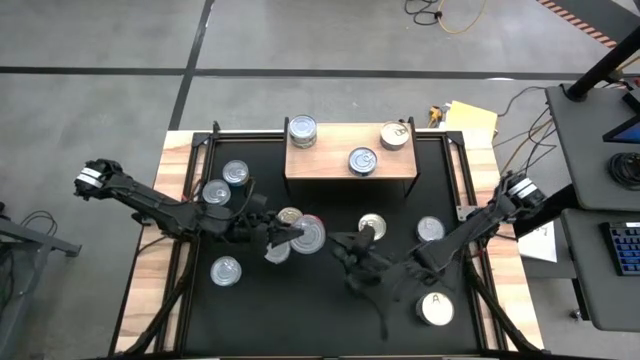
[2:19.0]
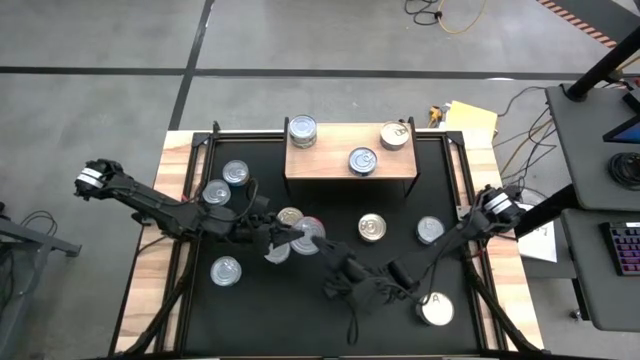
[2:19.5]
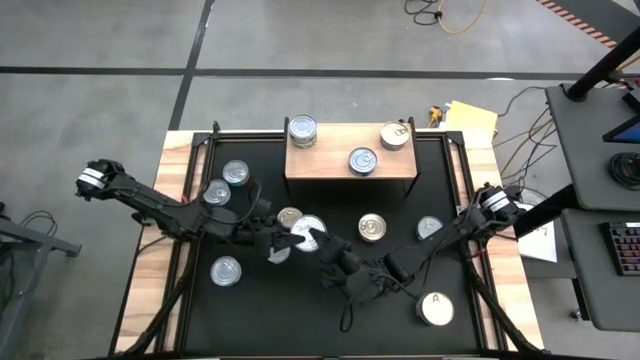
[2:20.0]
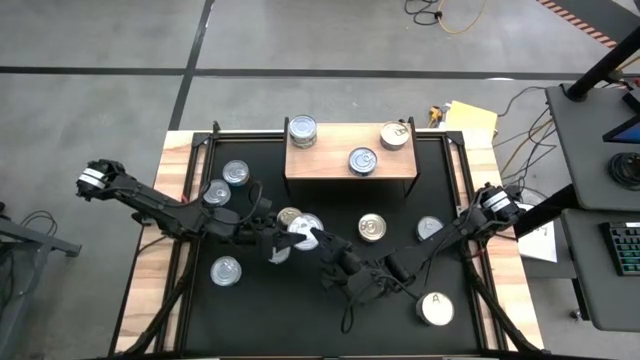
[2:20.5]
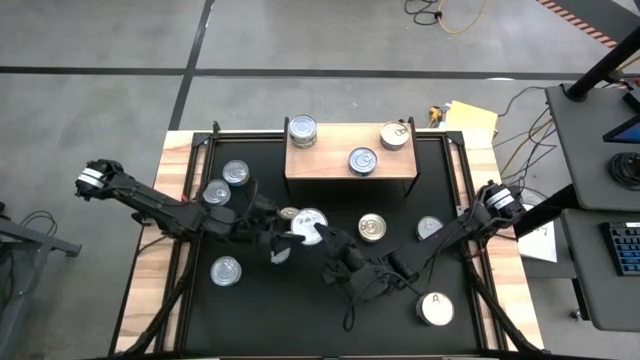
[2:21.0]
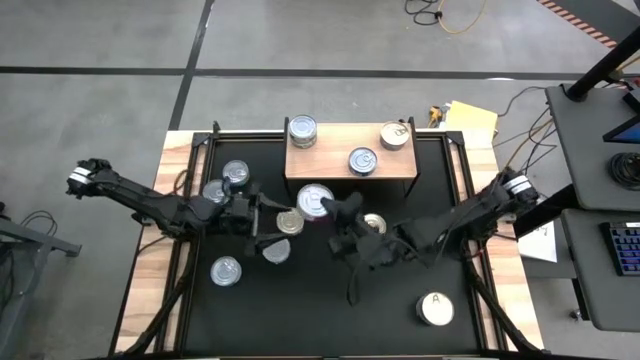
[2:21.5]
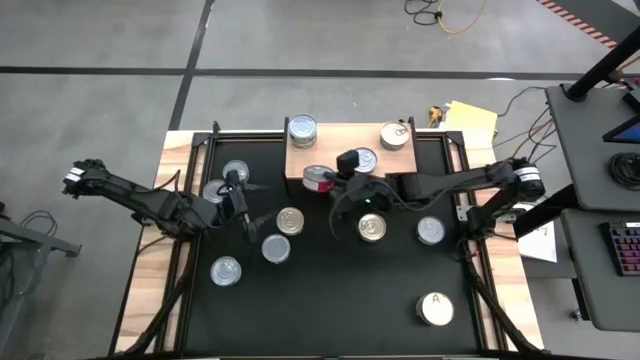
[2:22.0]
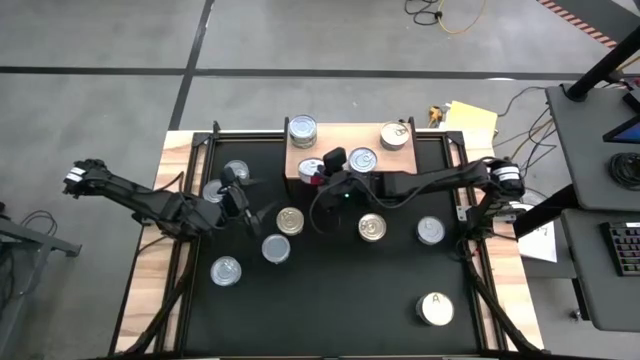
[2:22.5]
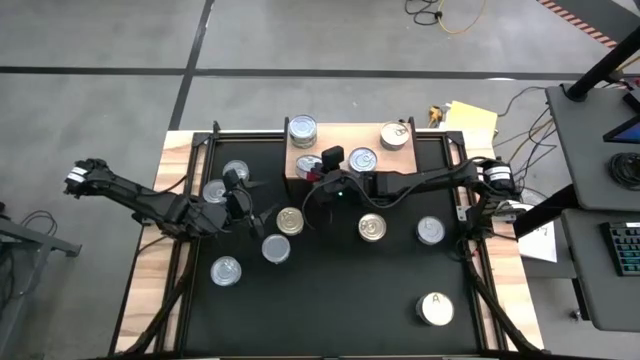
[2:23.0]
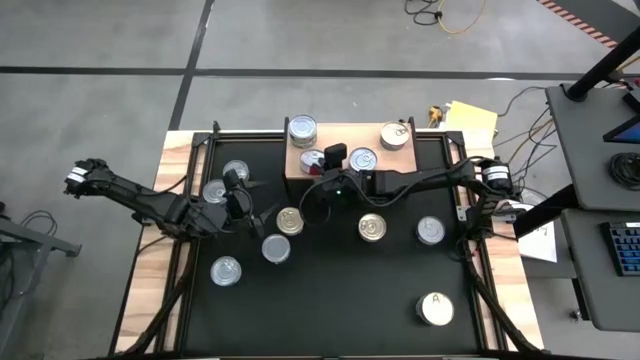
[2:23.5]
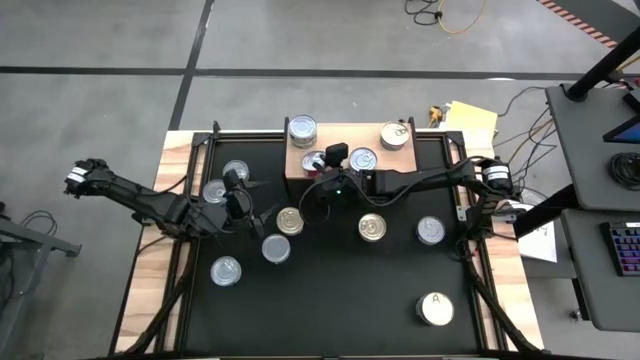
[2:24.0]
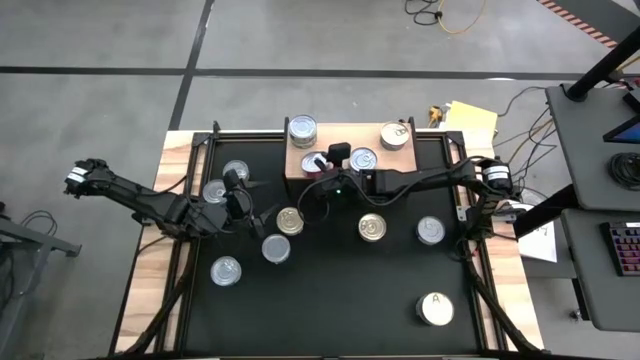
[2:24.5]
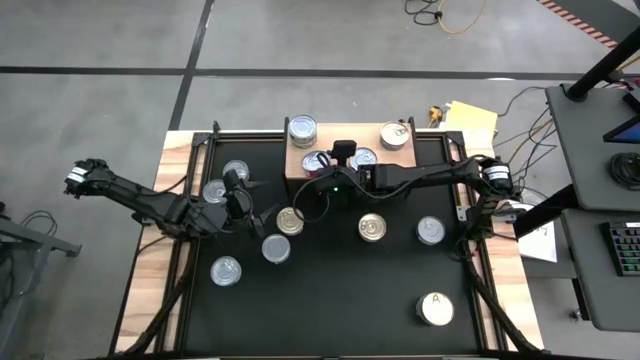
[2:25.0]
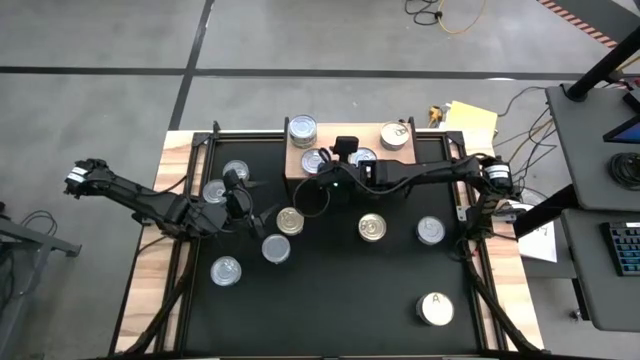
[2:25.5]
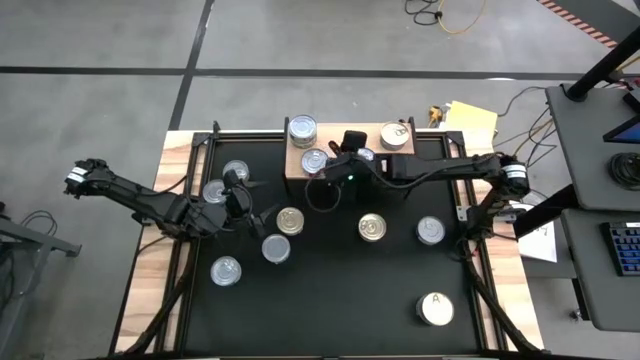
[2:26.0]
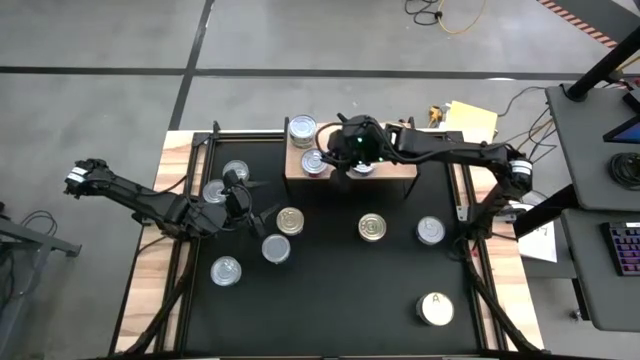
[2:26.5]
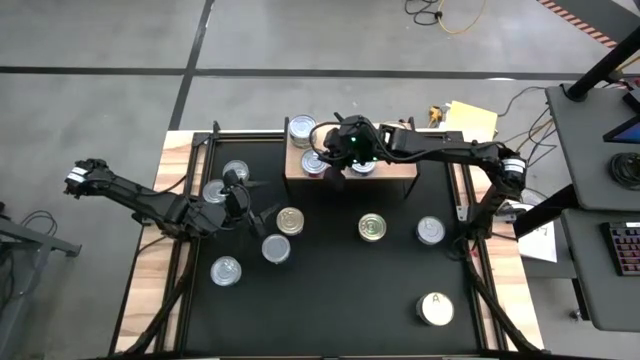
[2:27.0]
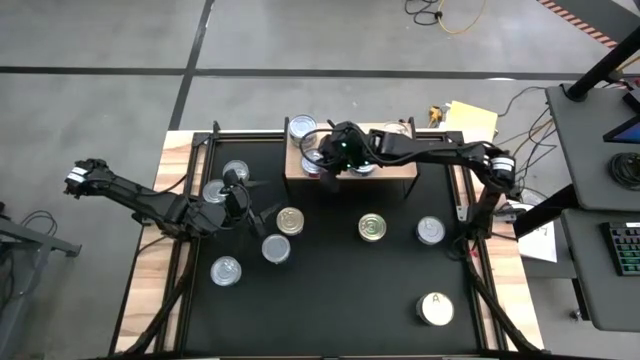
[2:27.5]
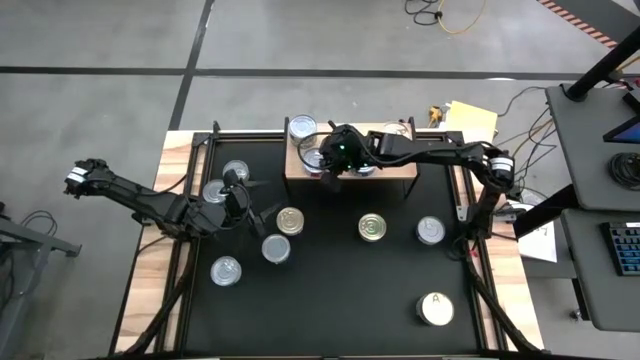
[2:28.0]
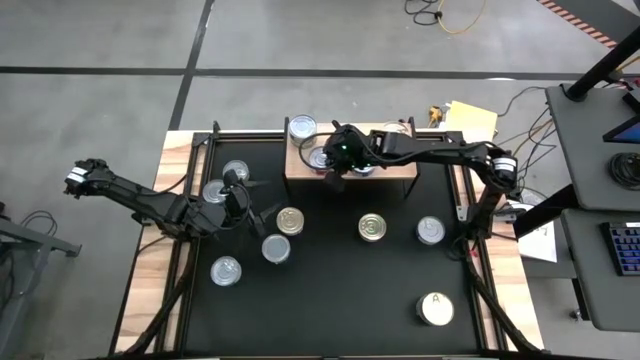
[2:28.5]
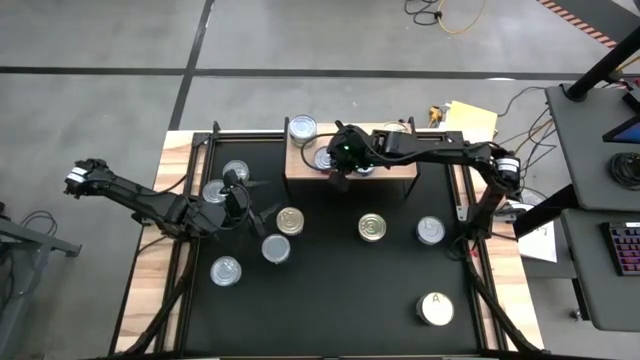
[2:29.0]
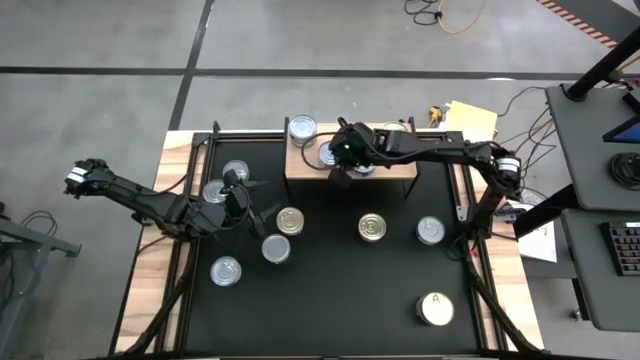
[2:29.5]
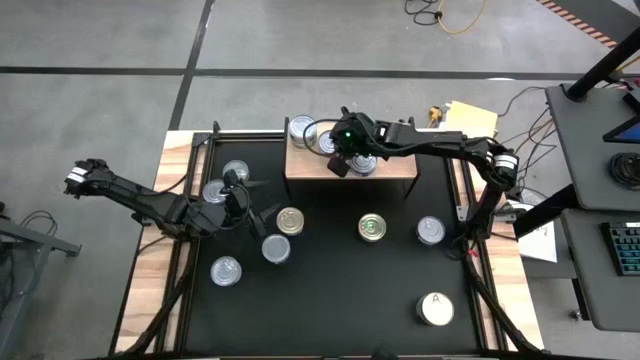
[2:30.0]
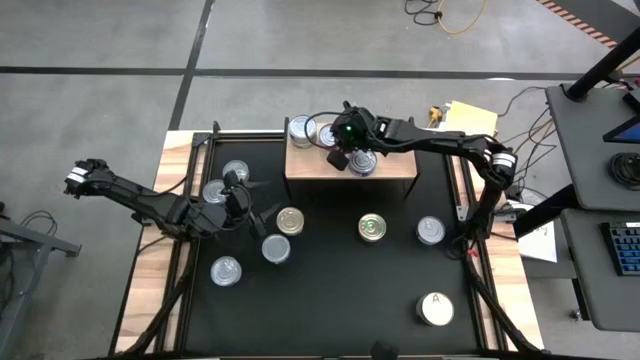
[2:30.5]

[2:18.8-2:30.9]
Task: Stack canned seafood by type on shelf
Put the red tuna can on the shelf

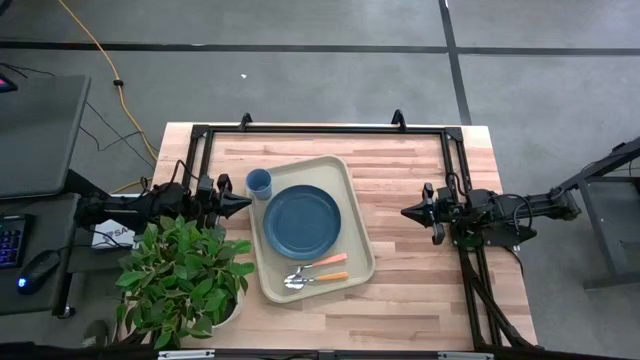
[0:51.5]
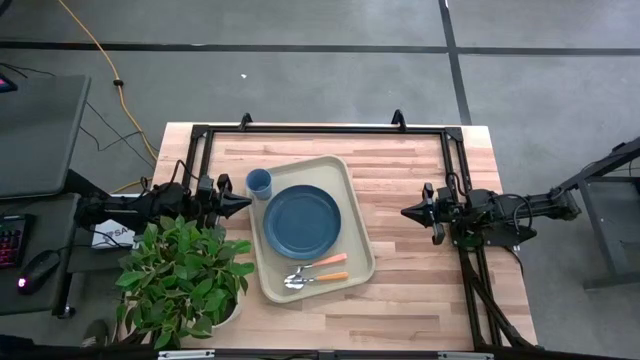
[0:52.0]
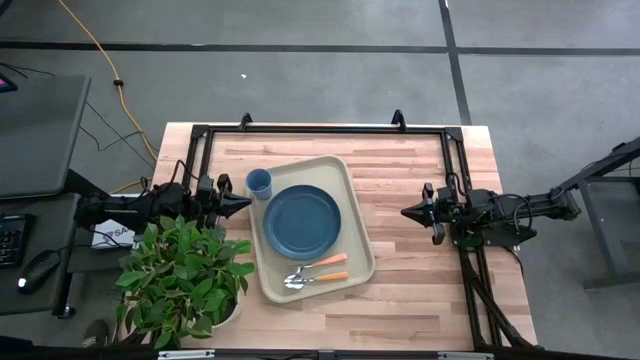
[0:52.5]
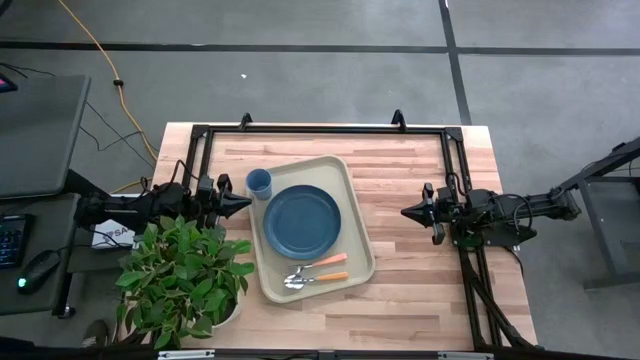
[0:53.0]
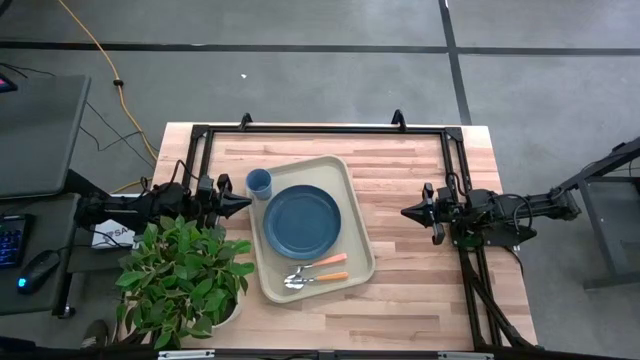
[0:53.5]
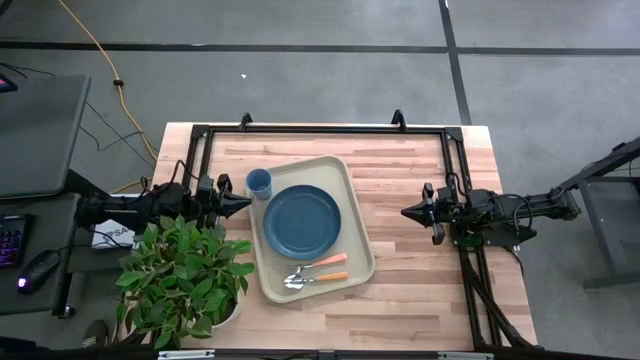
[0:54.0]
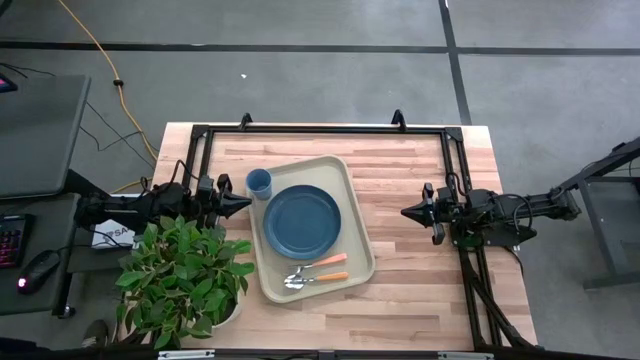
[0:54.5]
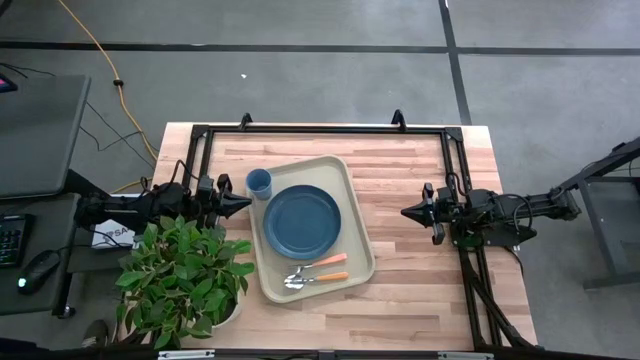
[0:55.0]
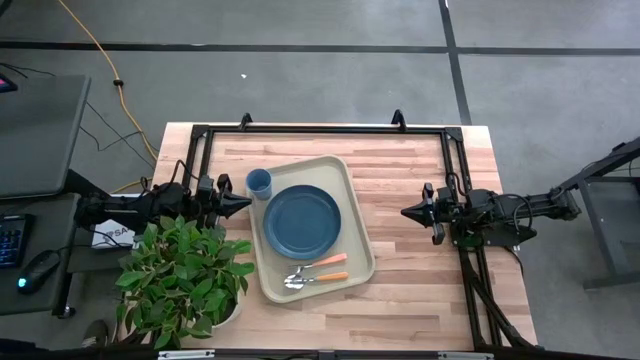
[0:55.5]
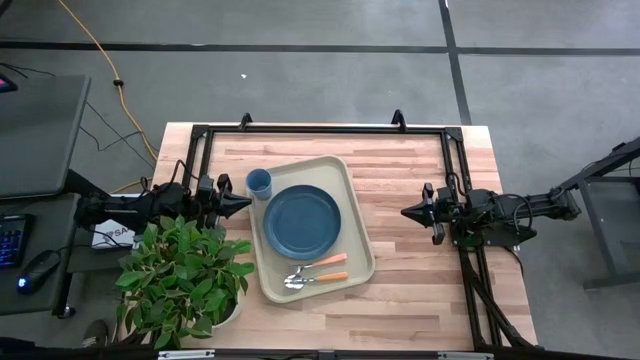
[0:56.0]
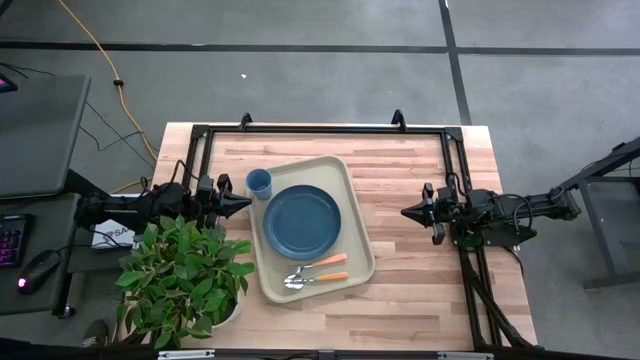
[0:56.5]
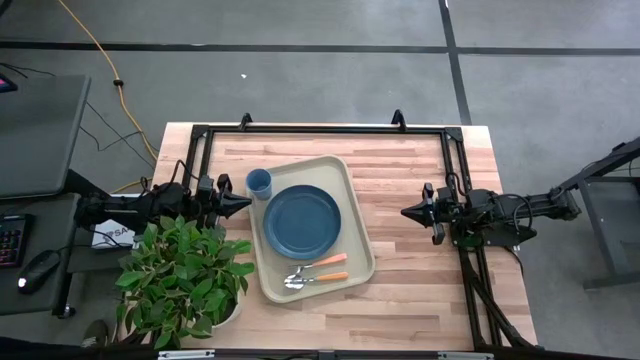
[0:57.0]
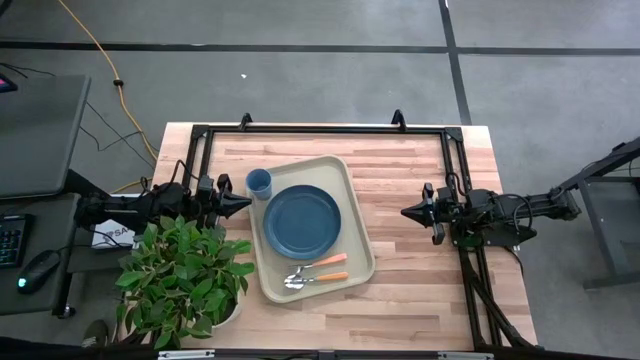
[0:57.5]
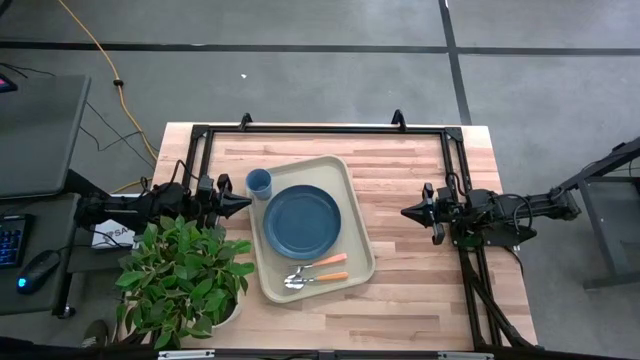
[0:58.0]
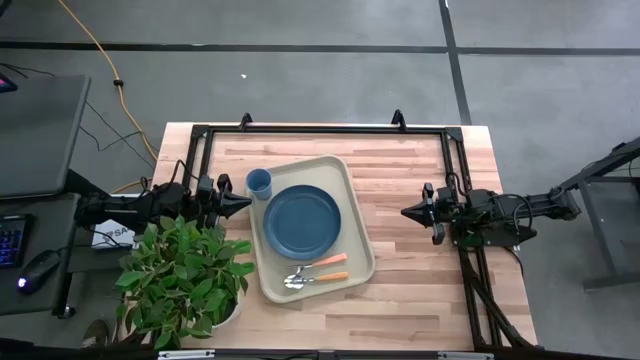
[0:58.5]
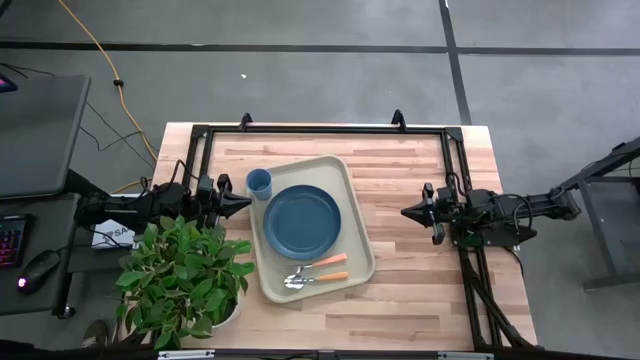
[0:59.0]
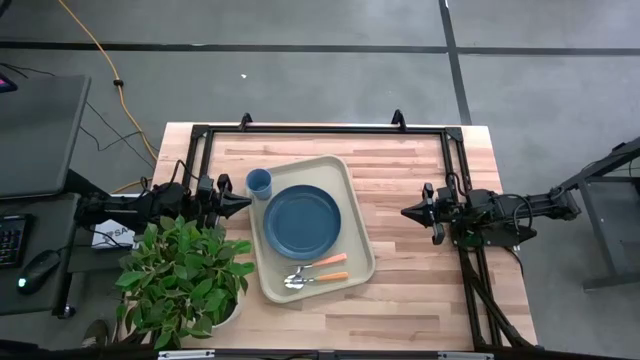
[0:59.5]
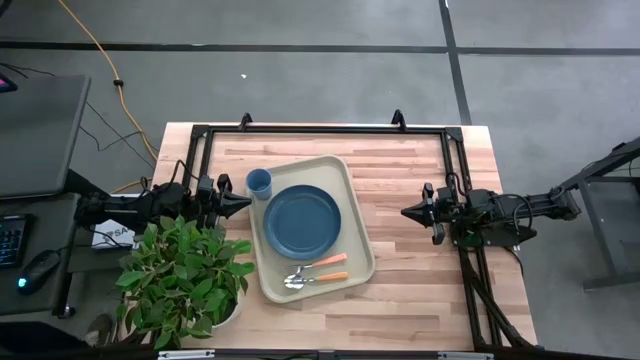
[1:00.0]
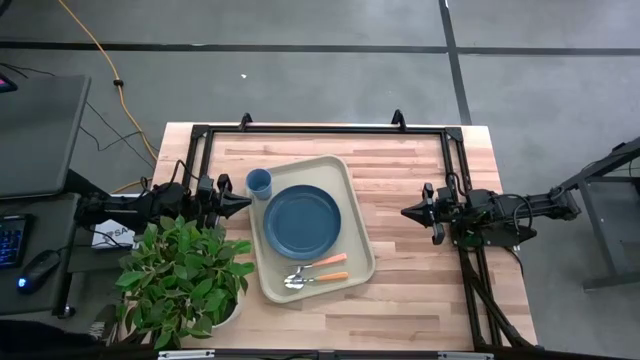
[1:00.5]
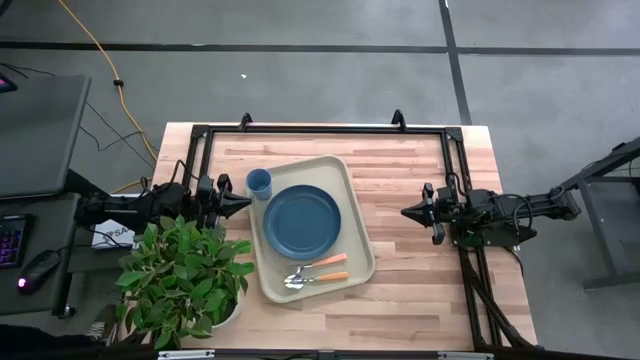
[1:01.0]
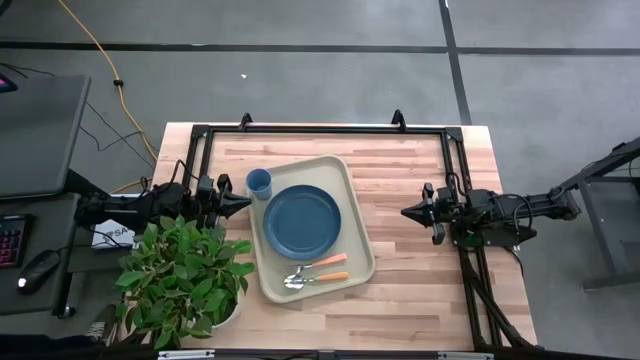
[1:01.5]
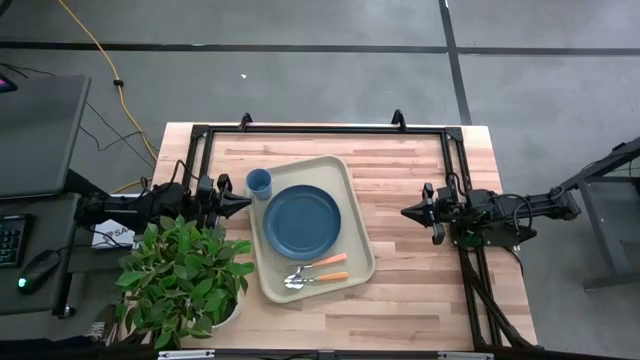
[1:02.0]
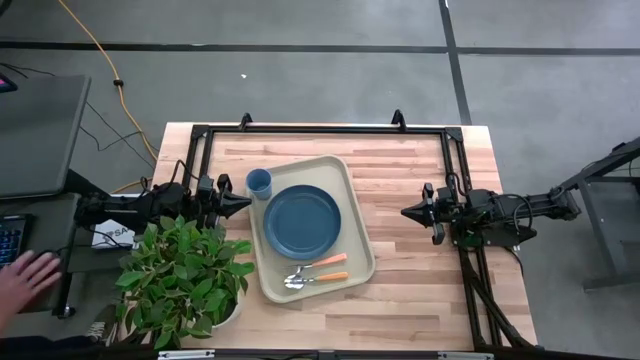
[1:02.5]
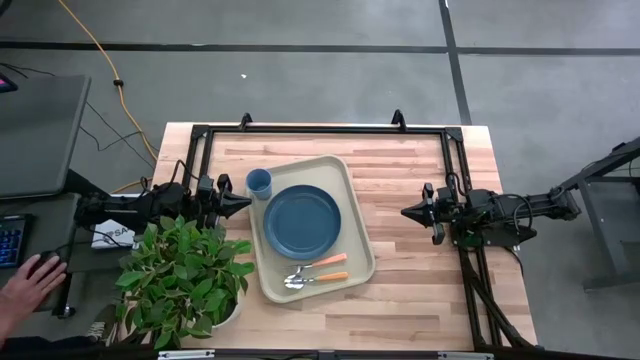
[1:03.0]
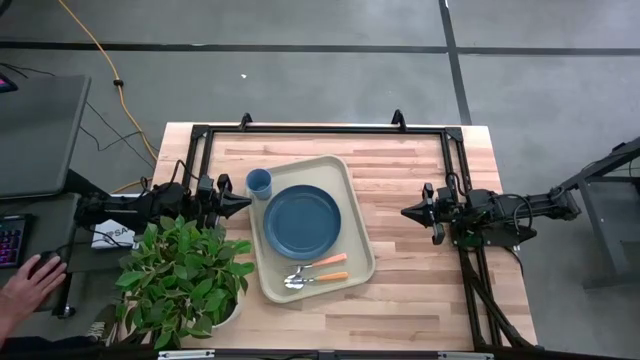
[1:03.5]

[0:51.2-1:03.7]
Task: Pick and place plate/cup/fork/spoon on tray
Return to Home Position
